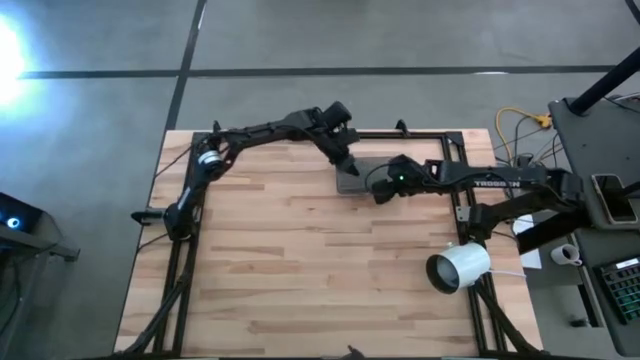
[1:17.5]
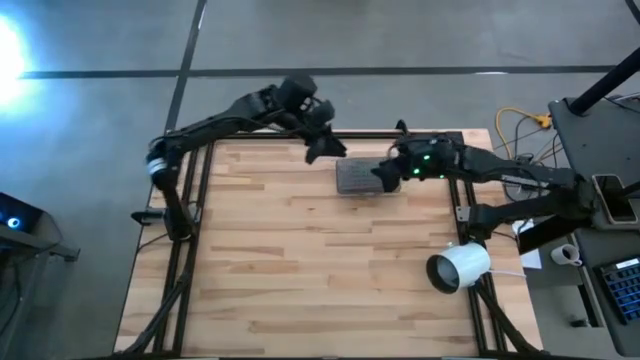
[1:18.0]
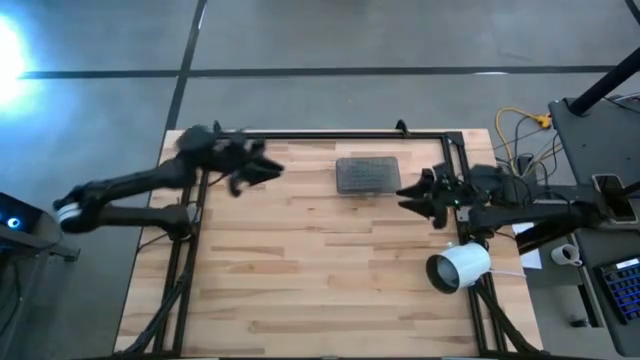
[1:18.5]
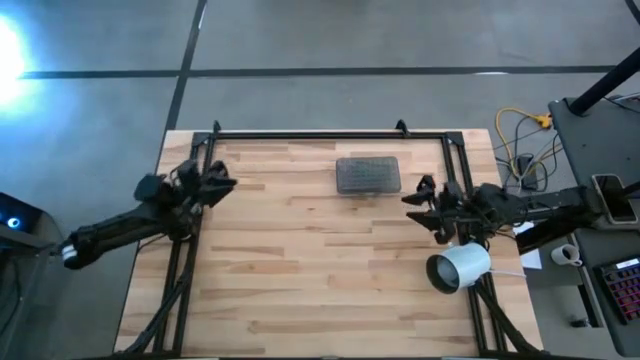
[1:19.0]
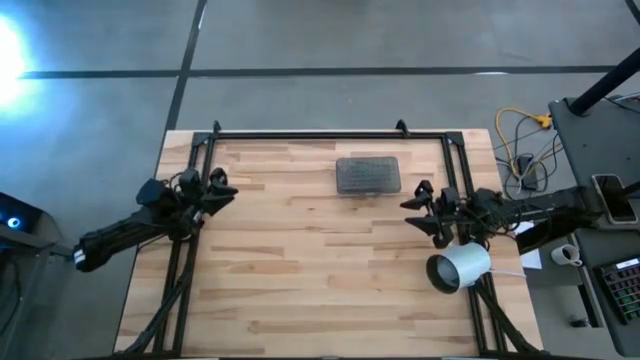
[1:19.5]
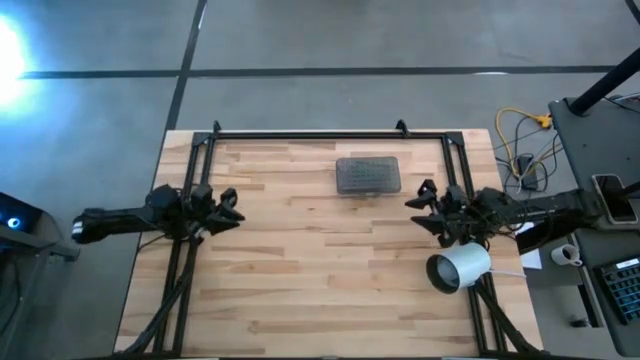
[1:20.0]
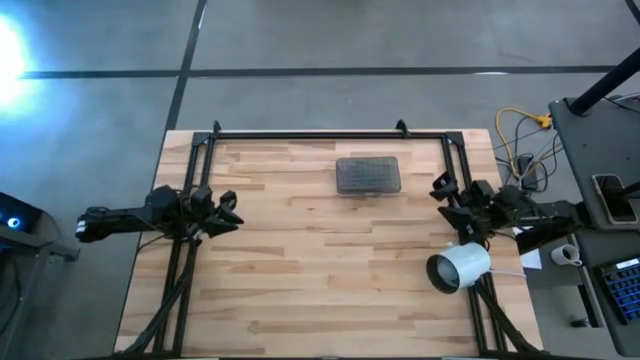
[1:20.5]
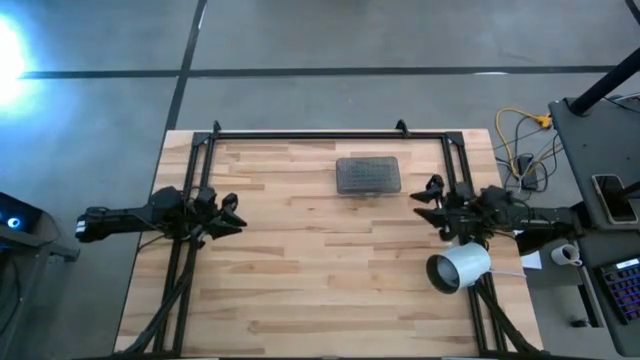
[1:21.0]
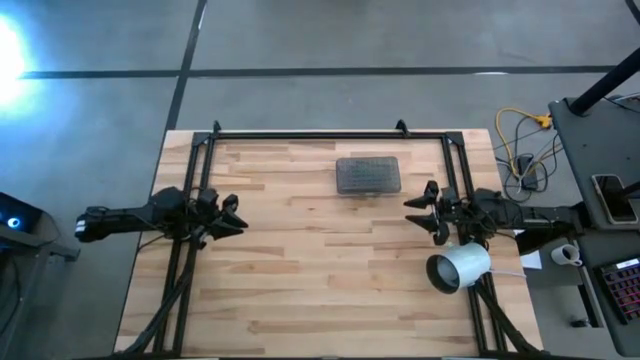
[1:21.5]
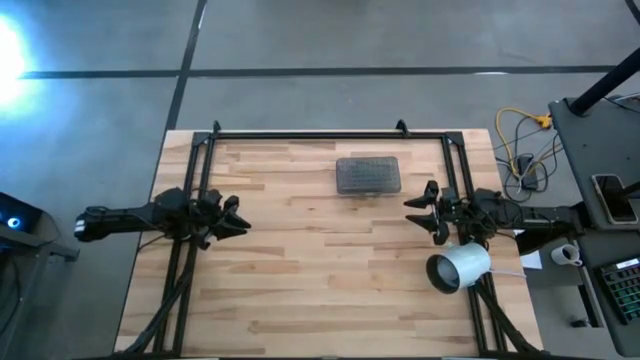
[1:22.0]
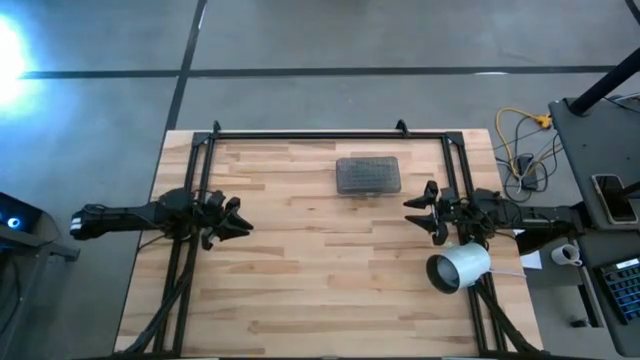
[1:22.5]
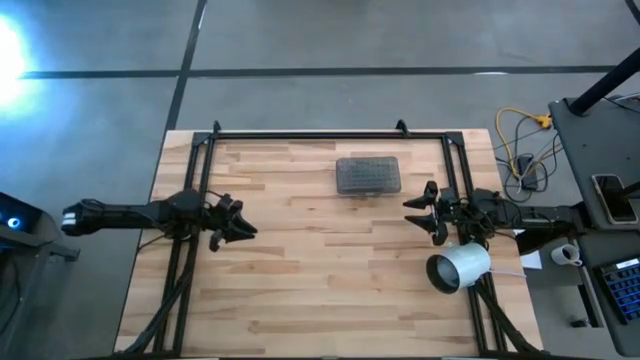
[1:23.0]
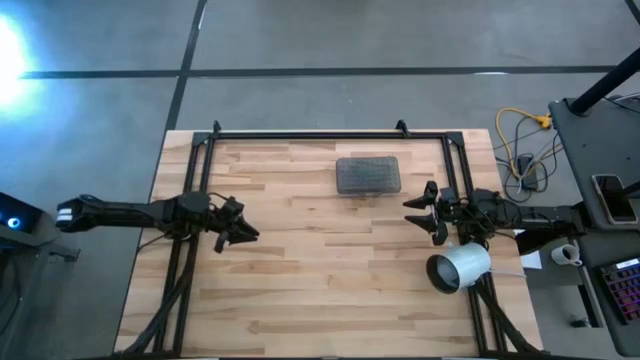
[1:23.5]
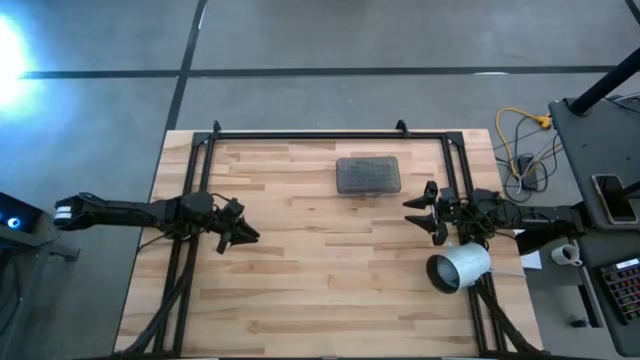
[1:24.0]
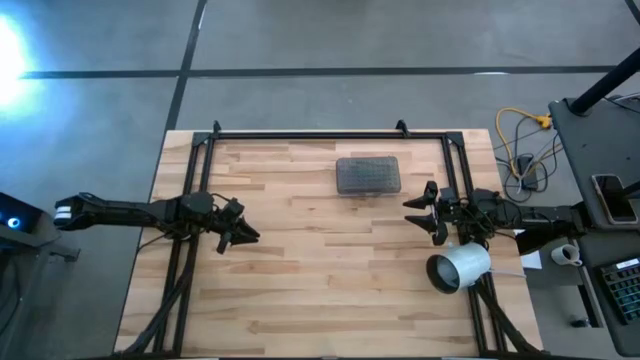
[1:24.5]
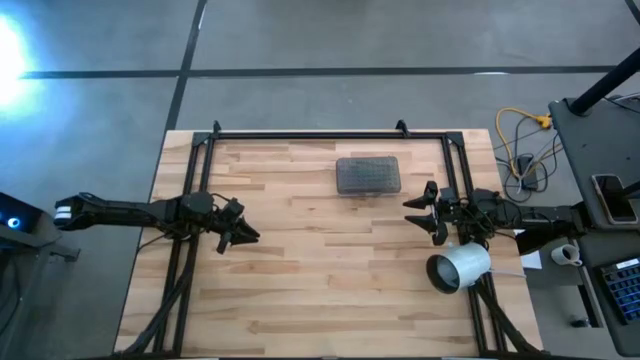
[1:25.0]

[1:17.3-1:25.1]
Task: Pick & place school supplies into a supply box
Return to Home Position

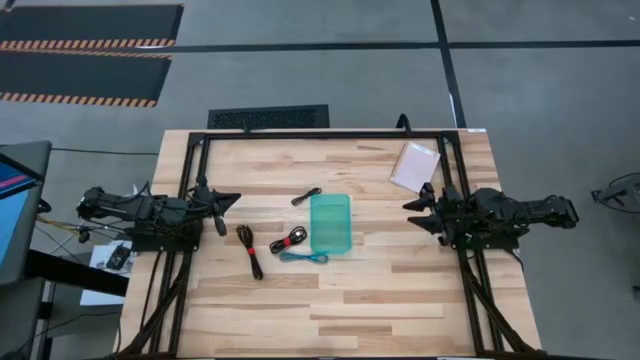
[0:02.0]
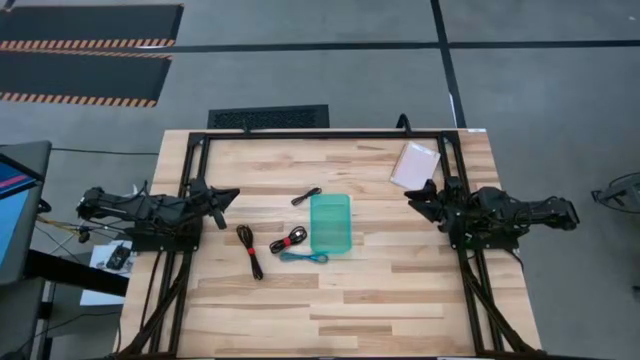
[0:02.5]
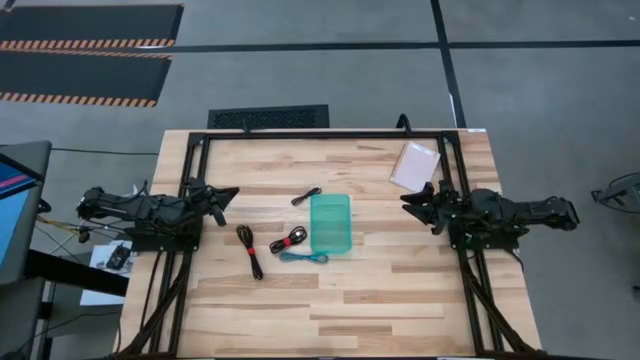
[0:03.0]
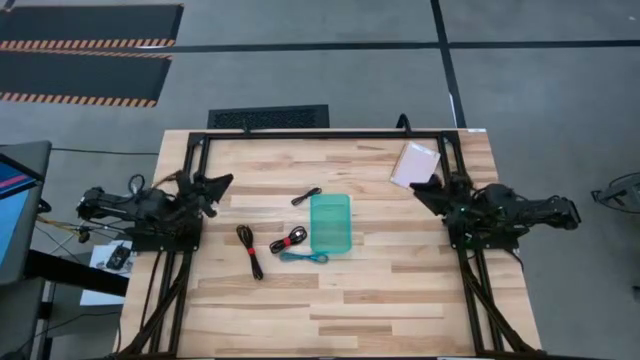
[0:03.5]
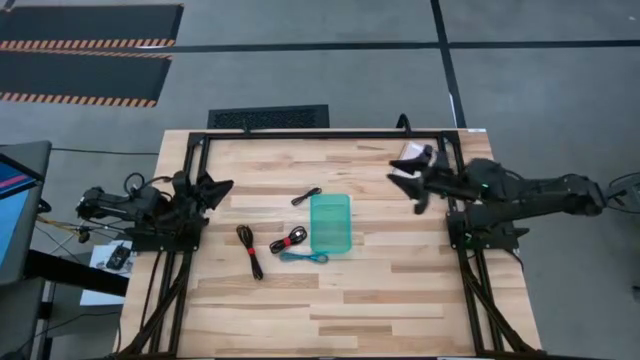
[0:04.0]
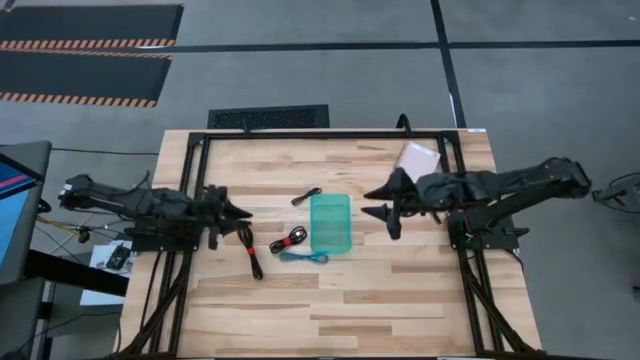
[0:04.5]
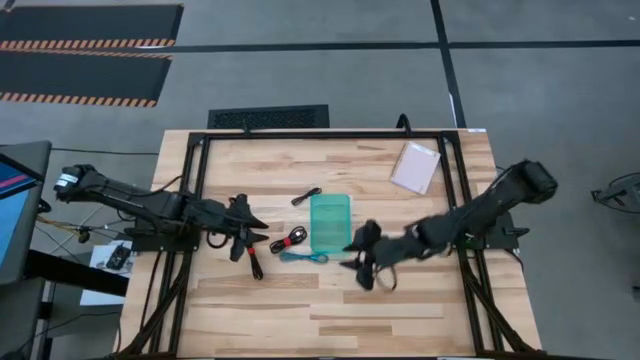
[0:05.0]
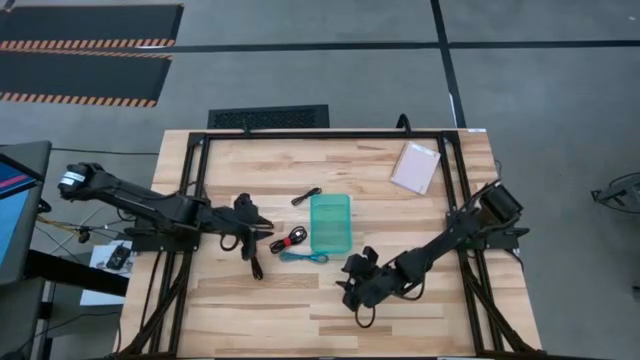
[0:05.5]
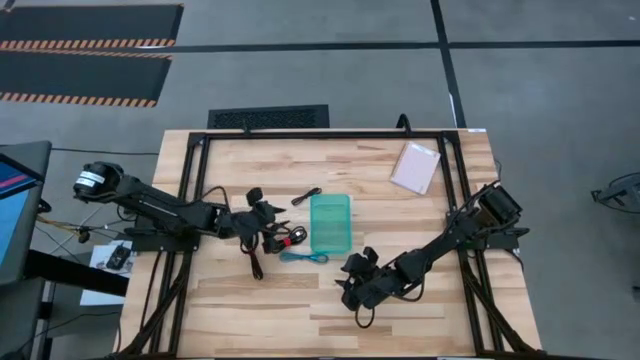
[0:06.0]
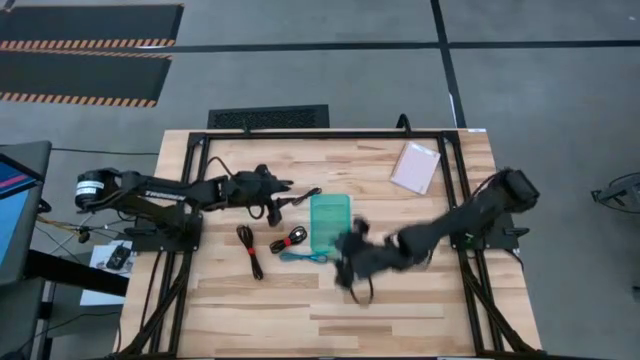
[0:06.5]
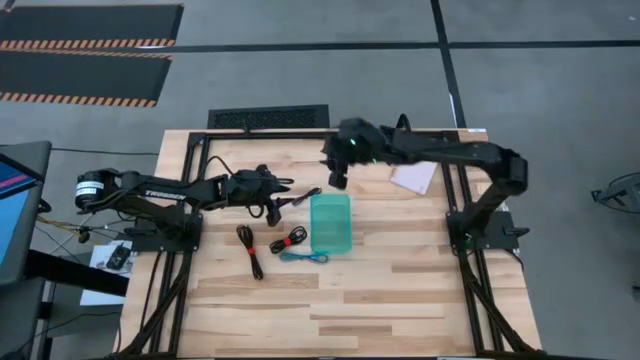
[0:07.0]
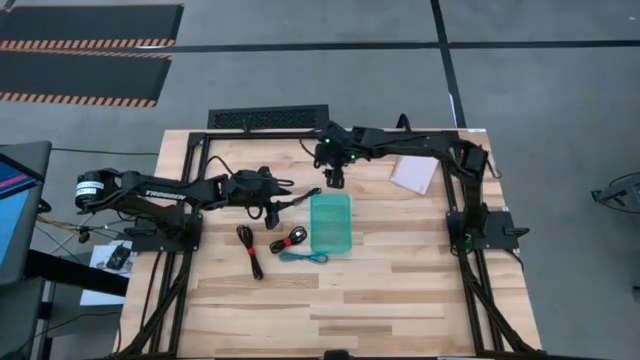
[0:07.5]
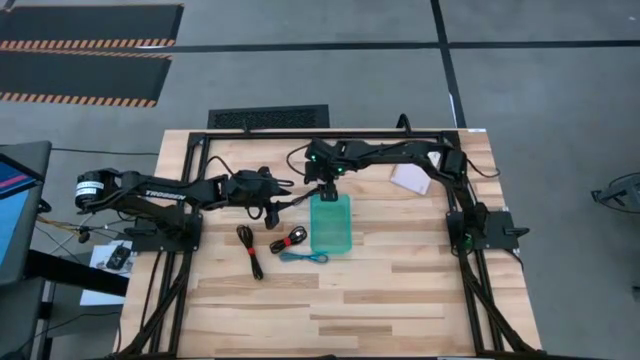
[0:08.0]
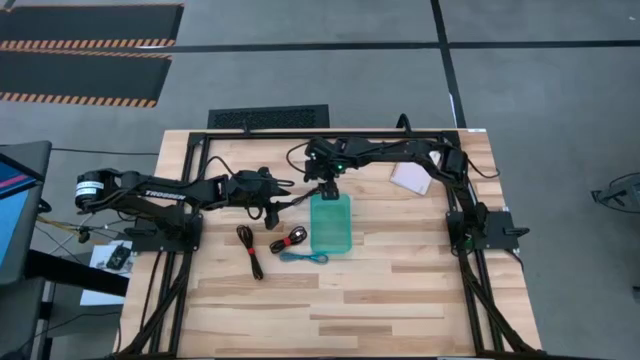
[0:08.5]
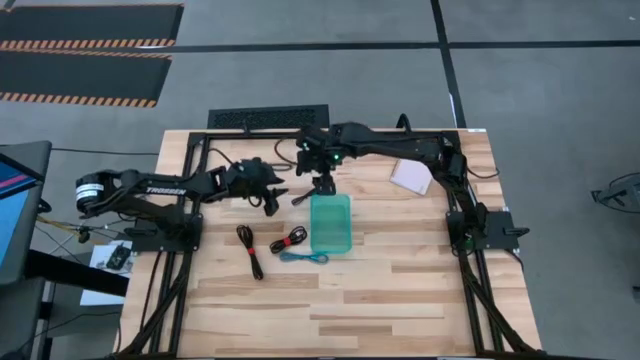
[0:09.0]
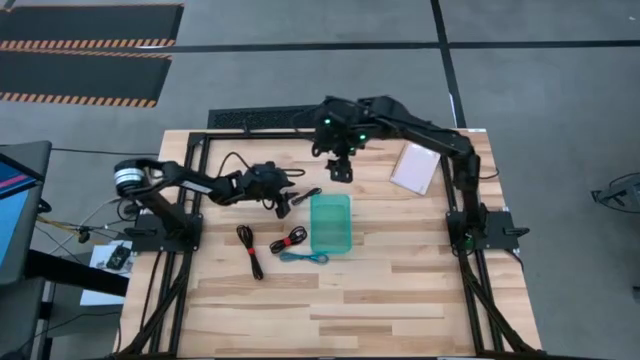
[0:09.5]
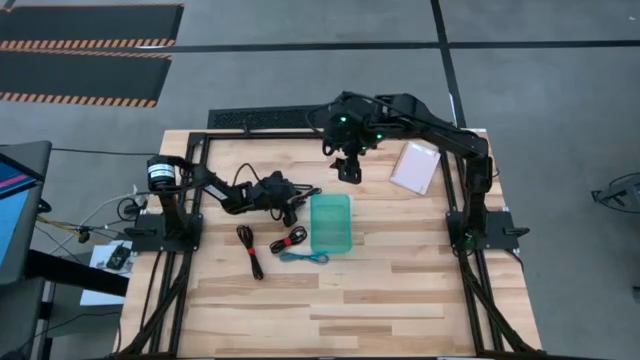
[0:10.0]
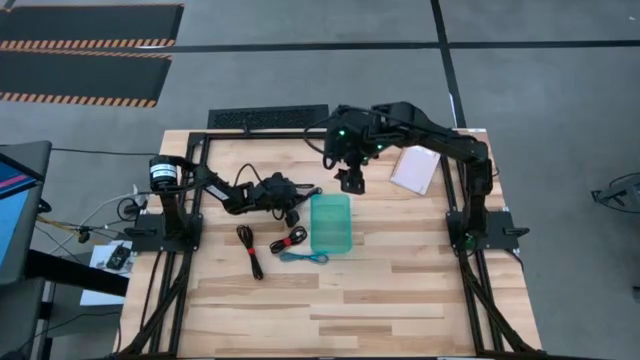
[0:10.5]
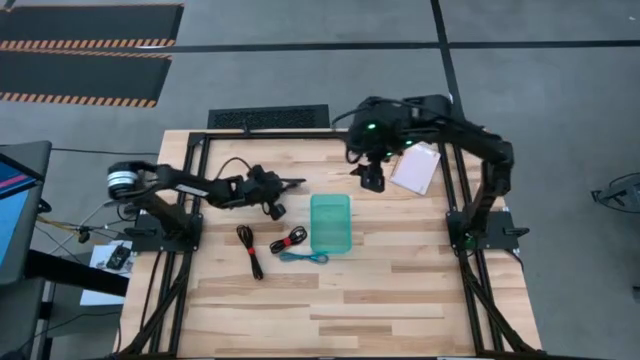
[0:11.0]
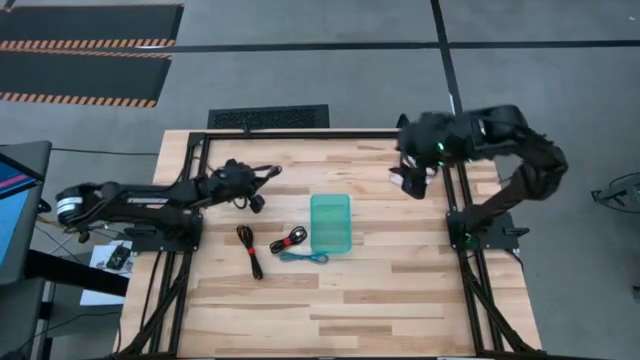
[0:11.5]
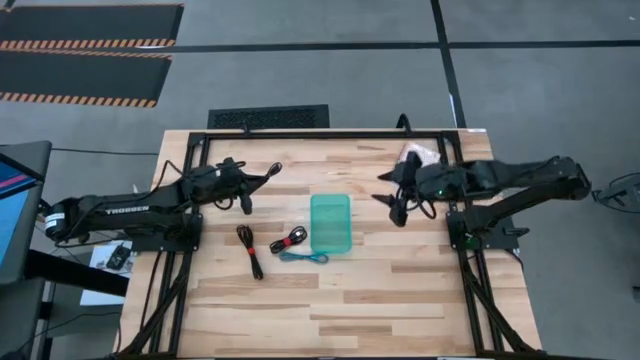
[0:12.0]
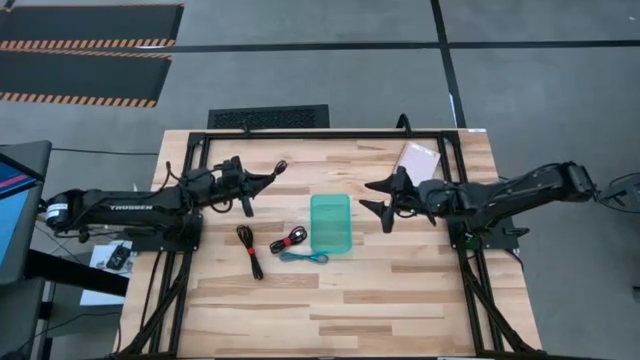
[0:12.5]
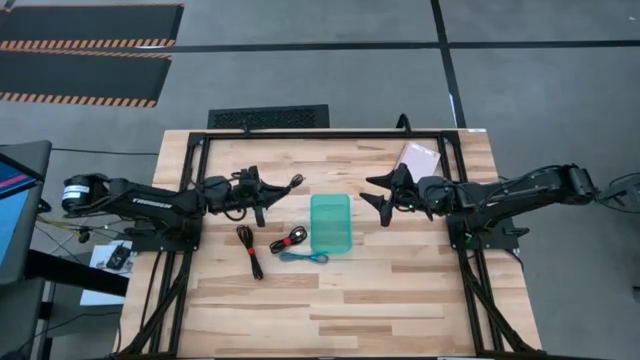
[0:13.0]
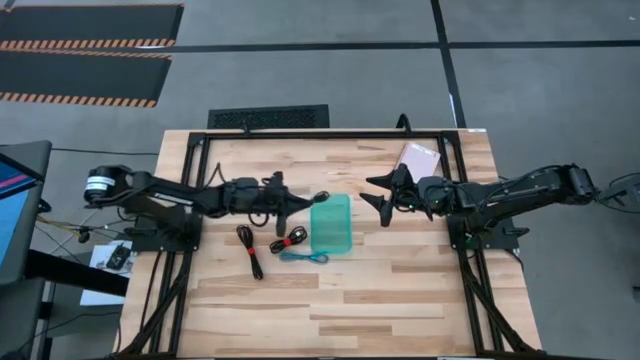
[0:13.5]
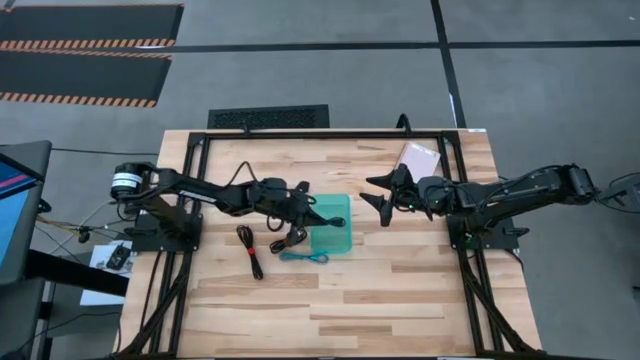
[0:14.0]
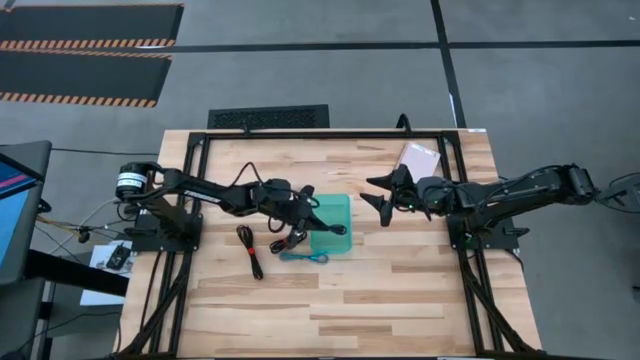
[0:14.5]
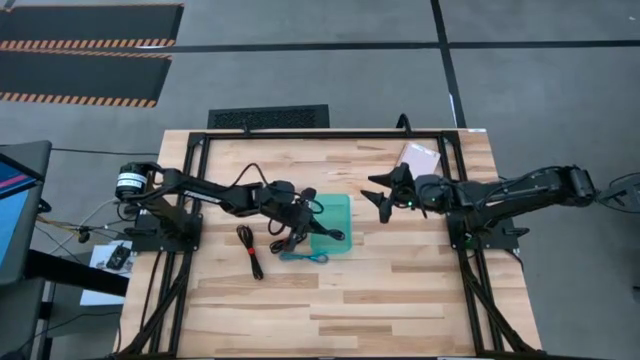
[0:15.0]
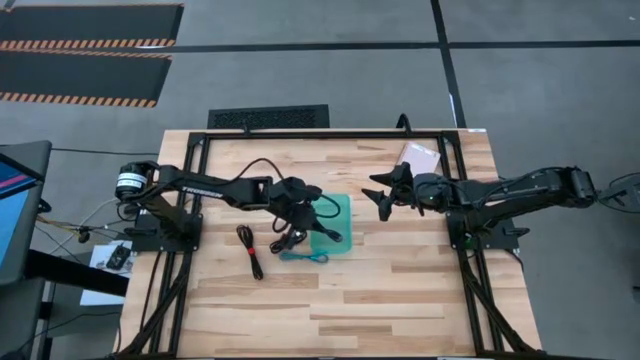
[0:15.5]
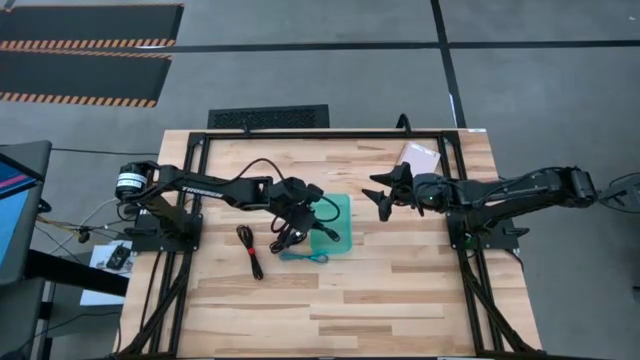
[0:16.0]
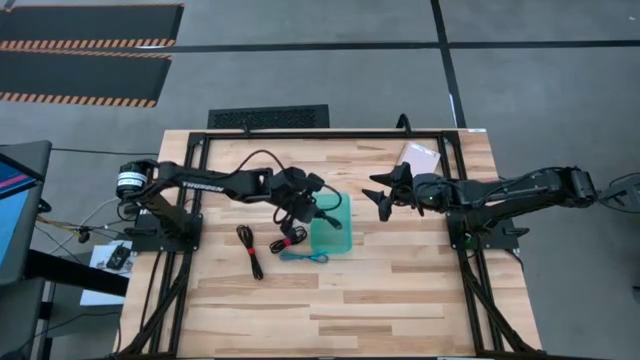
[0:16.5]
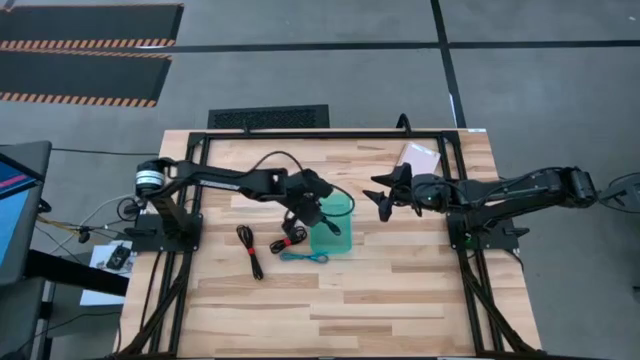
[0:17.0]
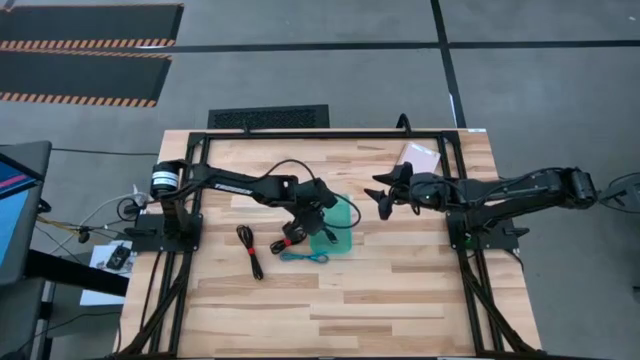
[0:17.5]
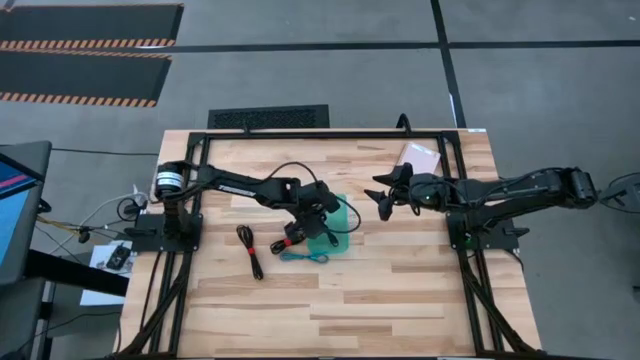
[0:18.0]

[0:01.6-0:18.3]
Task: Pick and place USB-C Cables
Put the top black charger cable into the green bin
